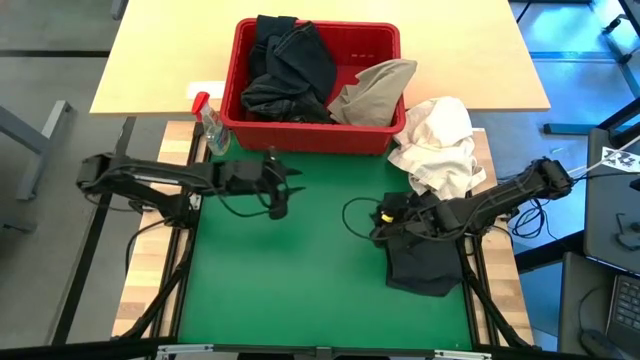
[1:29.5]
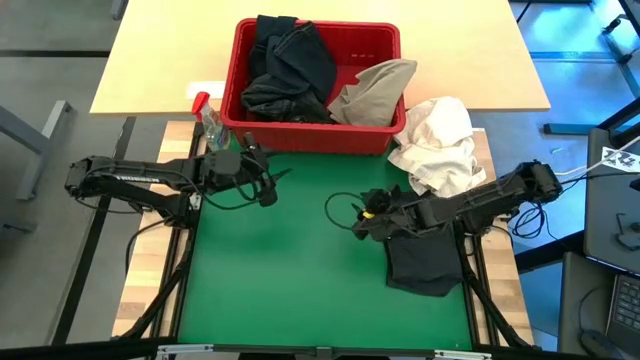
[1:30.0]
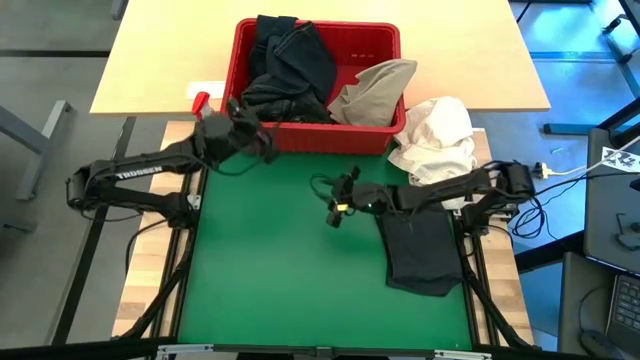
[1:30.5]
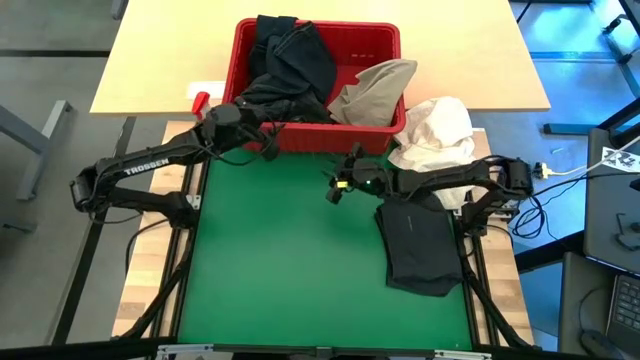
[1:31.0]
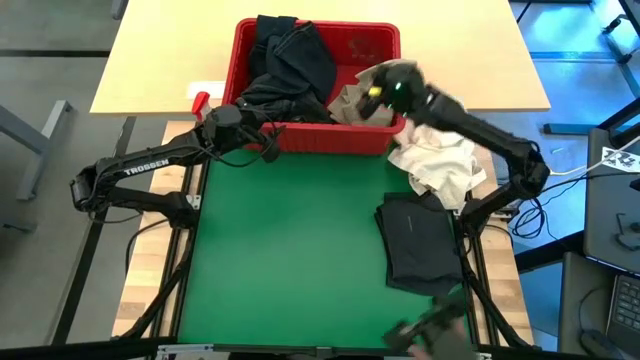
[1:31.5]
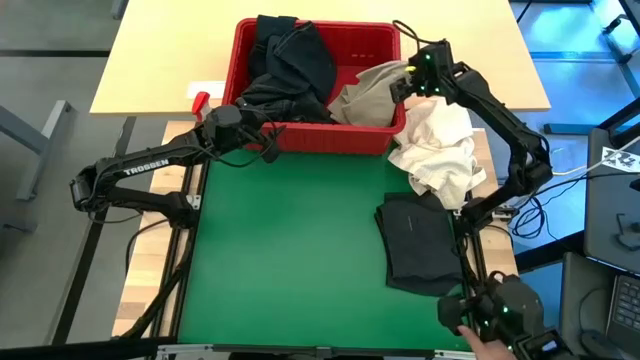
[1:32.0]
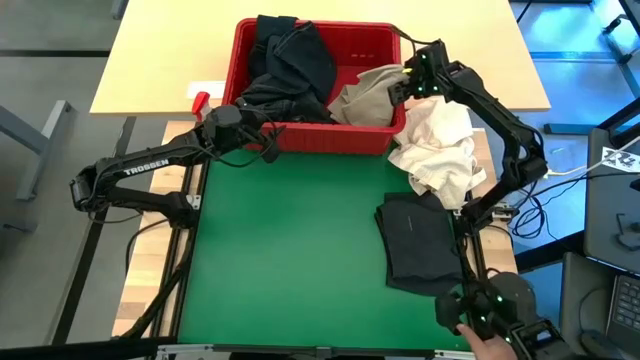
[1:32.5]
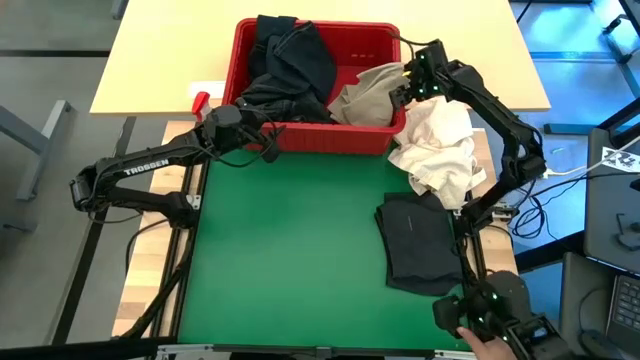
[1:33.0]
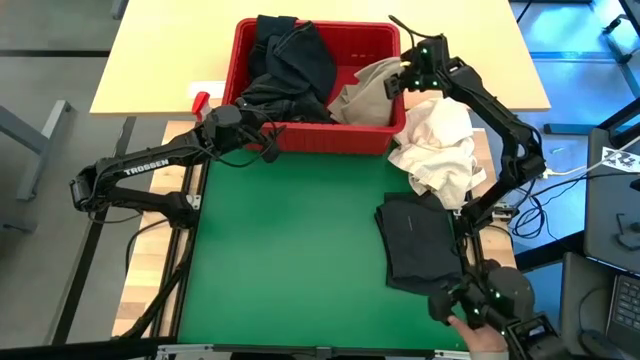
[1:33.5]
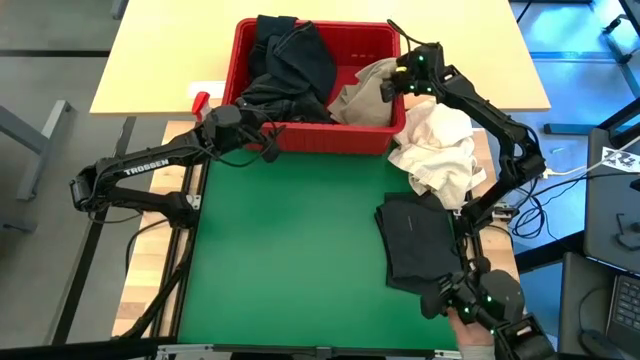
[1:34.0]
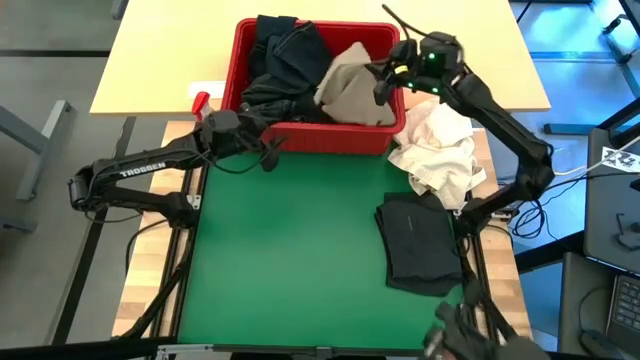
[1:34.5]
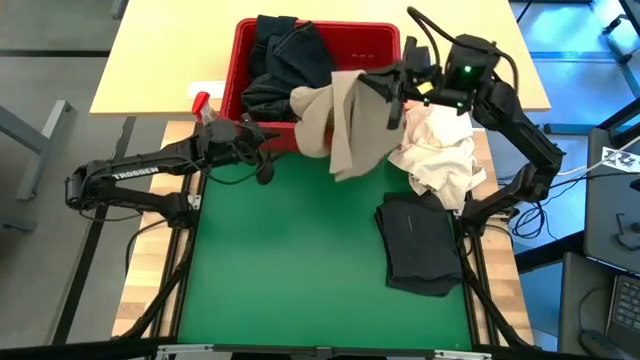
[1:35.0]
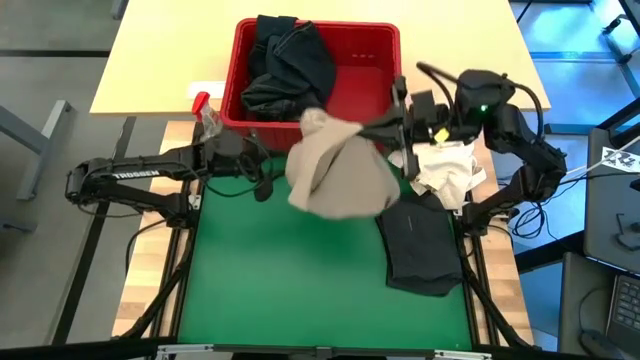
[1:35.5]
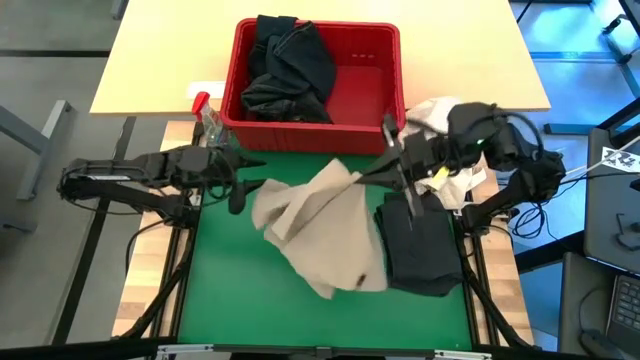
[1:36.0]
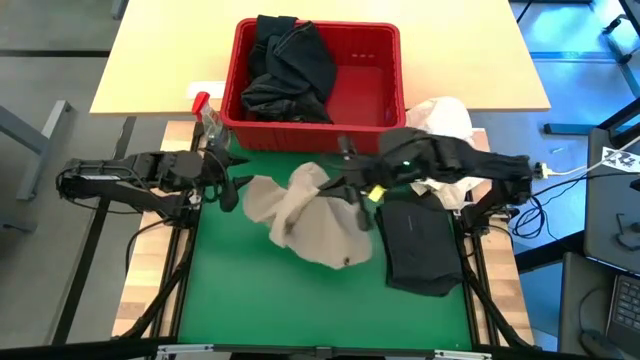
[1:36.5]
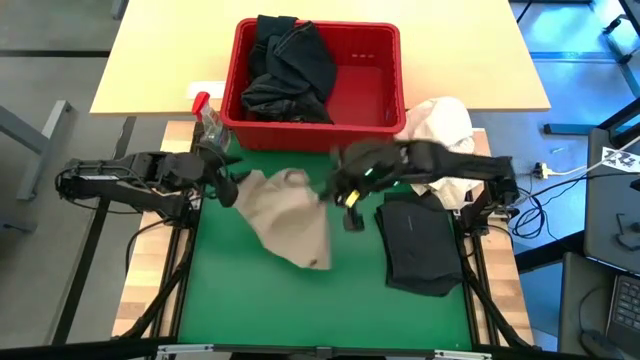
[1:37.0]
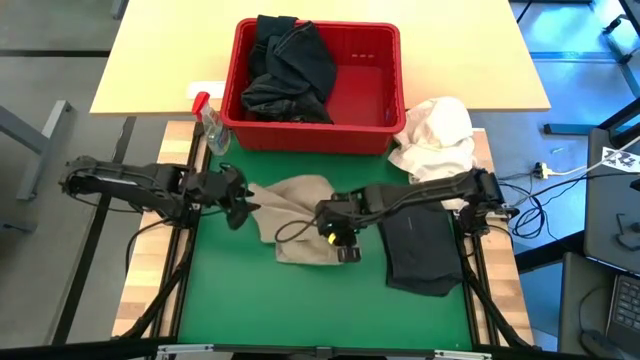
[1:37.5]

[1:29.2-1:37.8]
Task: Fold Laundry from Bin
Remove the brown shorts from the red laundry bin

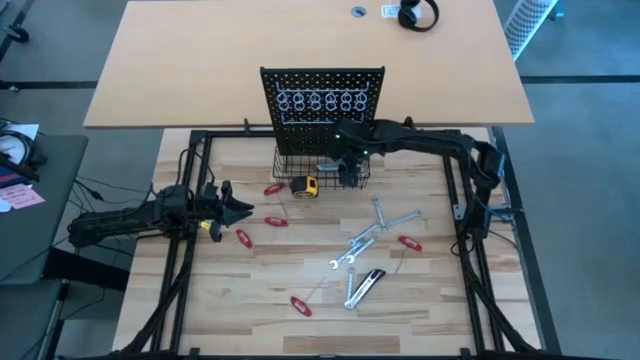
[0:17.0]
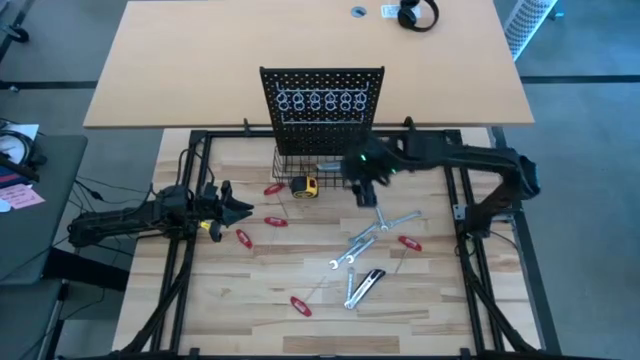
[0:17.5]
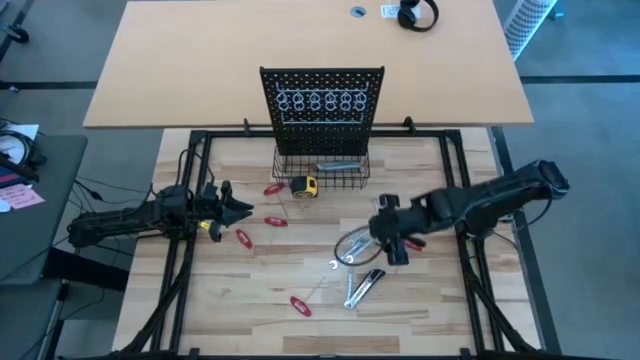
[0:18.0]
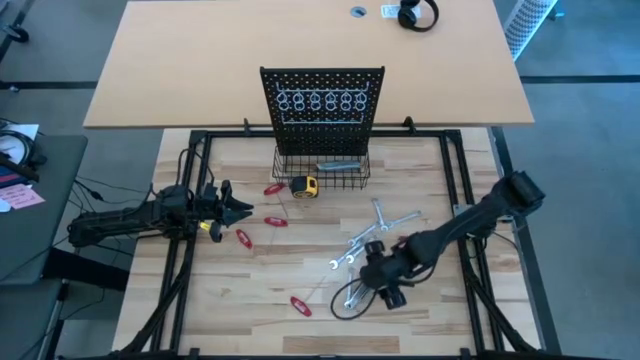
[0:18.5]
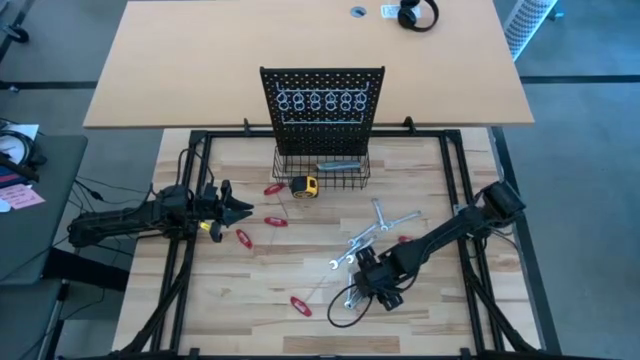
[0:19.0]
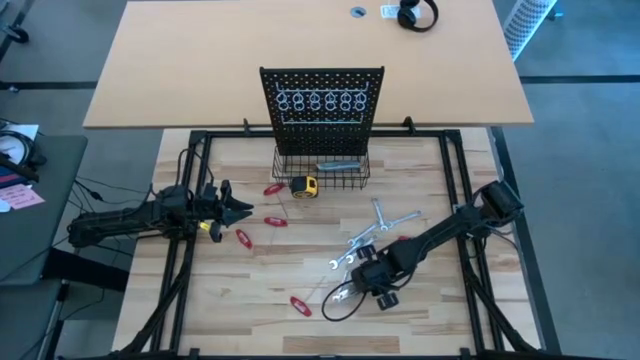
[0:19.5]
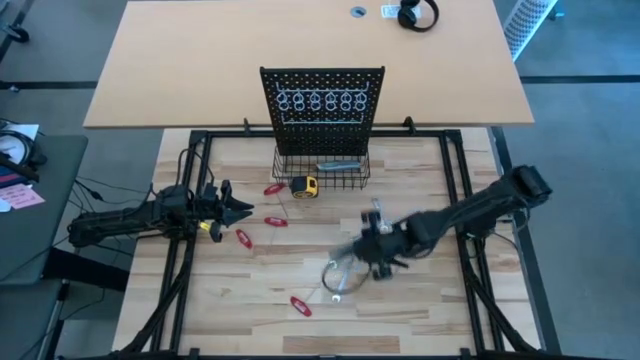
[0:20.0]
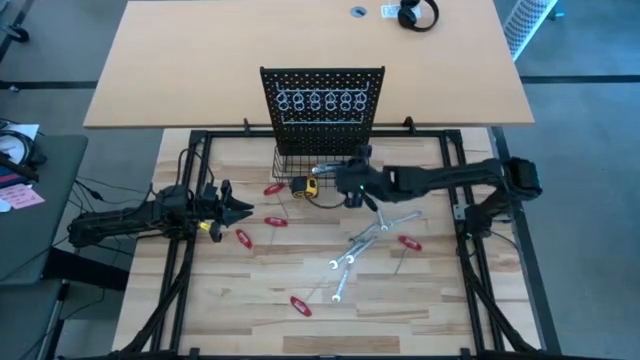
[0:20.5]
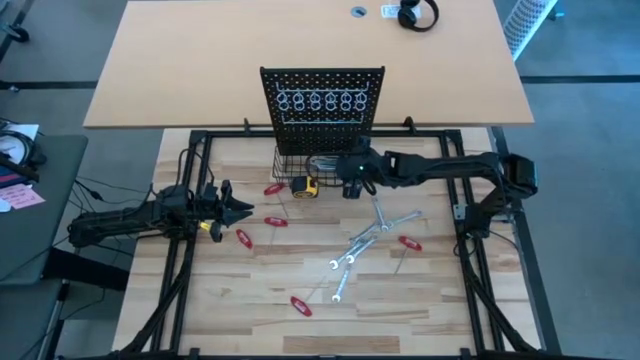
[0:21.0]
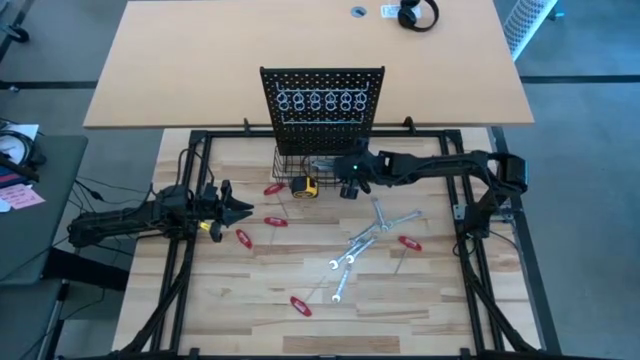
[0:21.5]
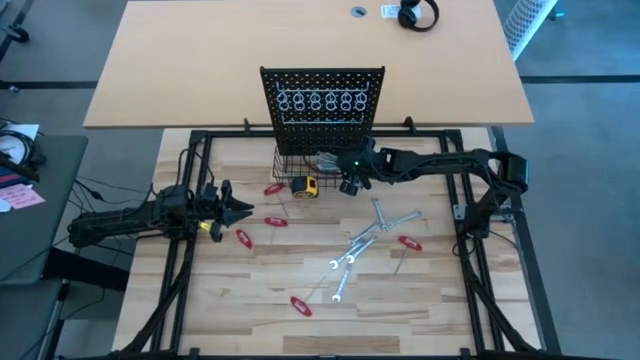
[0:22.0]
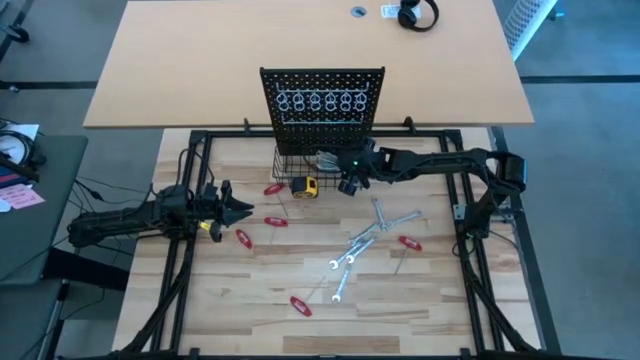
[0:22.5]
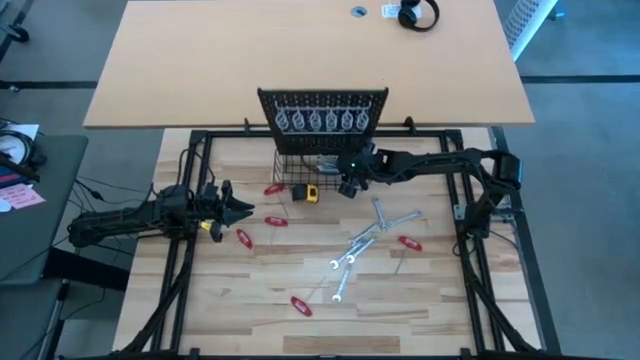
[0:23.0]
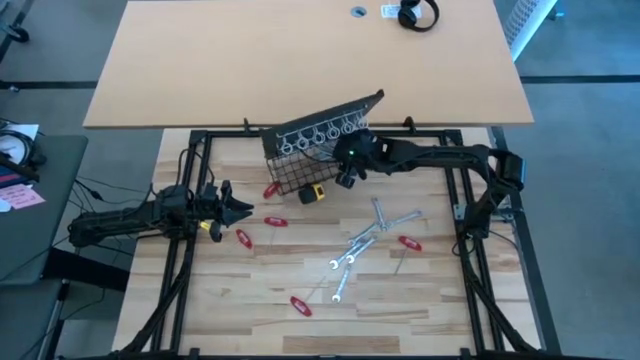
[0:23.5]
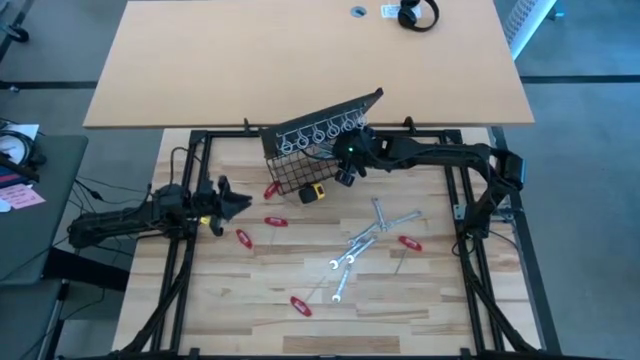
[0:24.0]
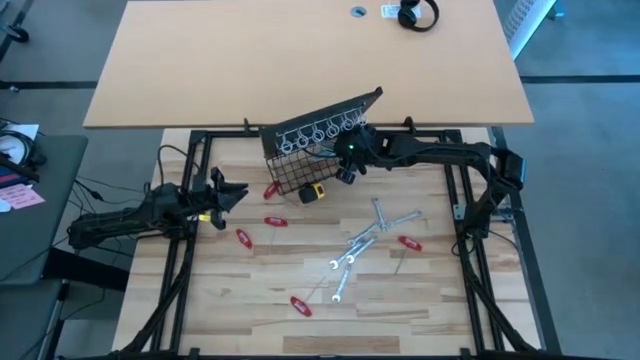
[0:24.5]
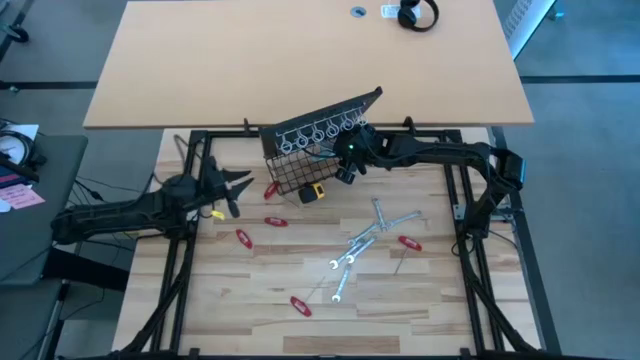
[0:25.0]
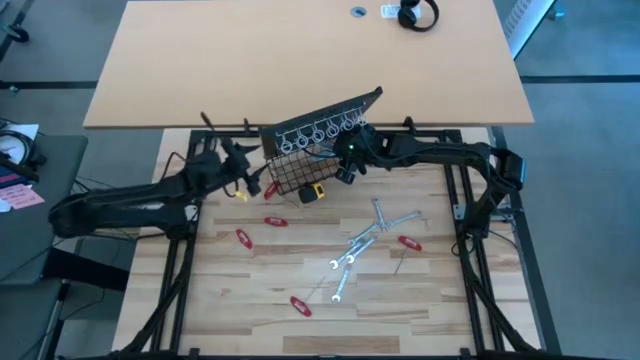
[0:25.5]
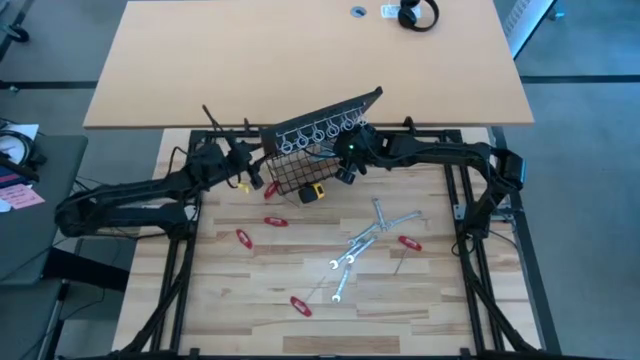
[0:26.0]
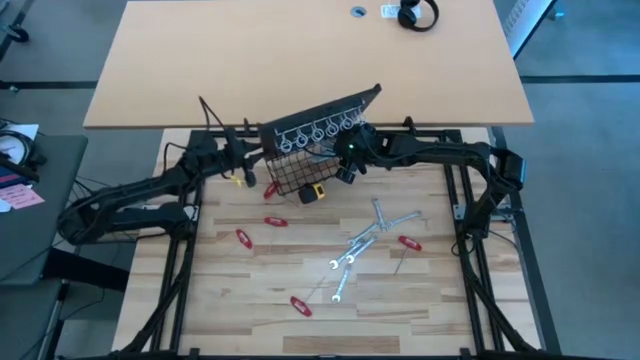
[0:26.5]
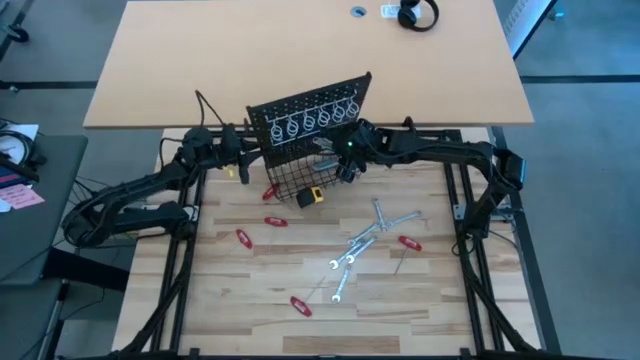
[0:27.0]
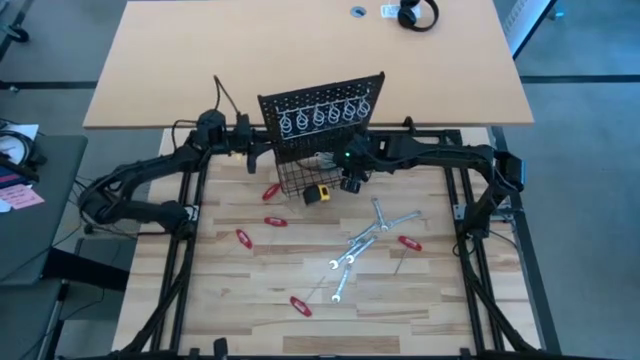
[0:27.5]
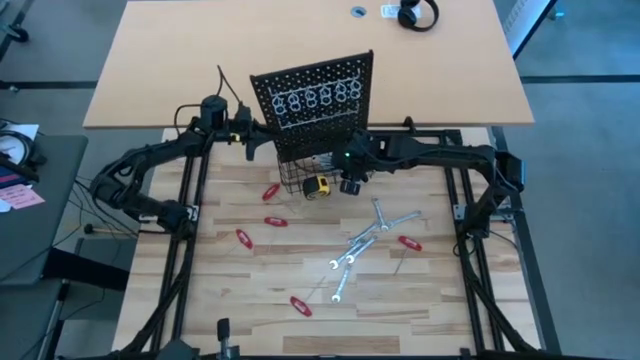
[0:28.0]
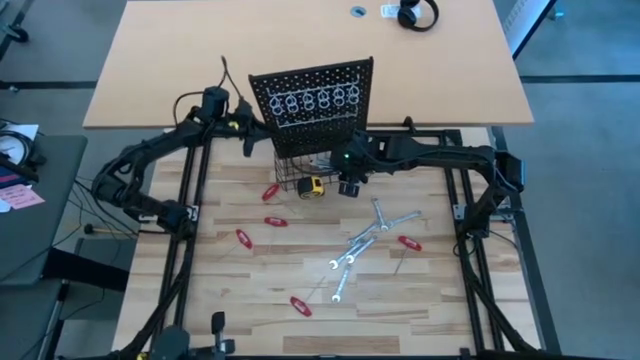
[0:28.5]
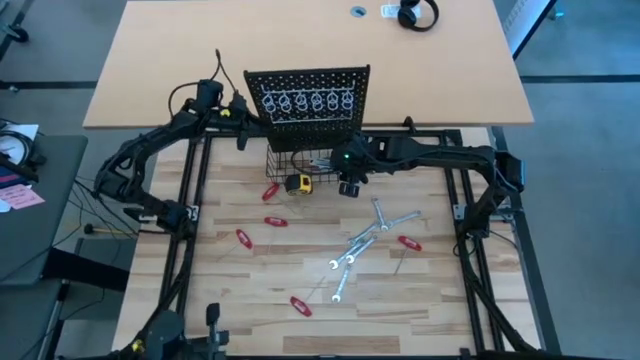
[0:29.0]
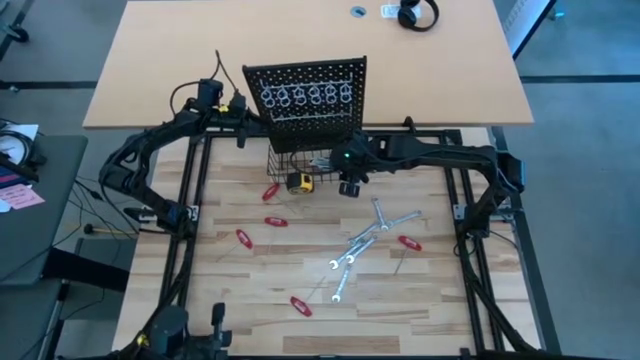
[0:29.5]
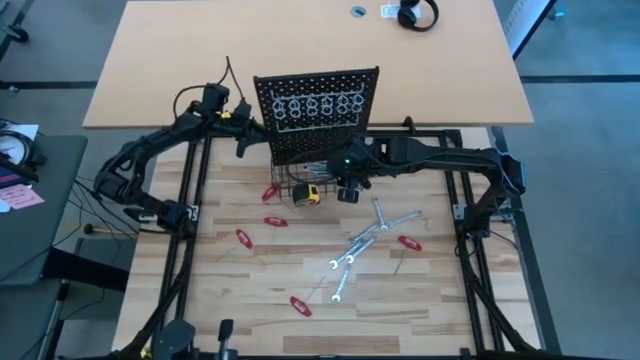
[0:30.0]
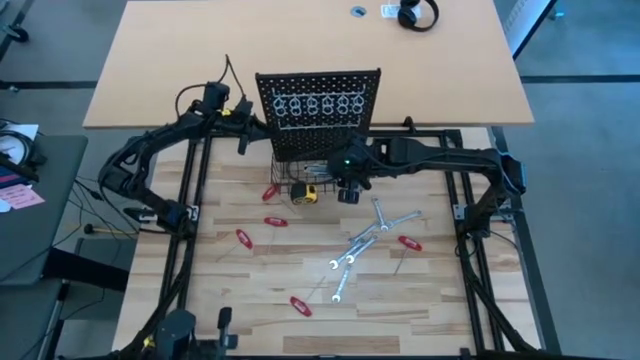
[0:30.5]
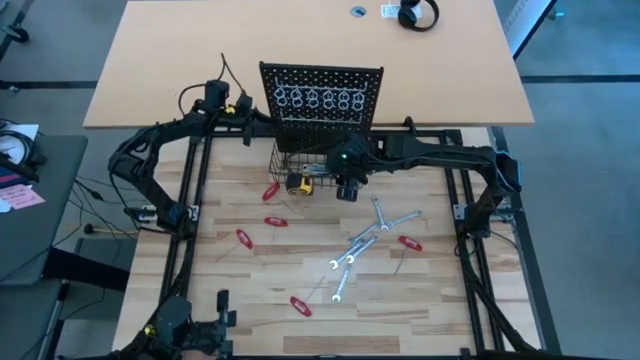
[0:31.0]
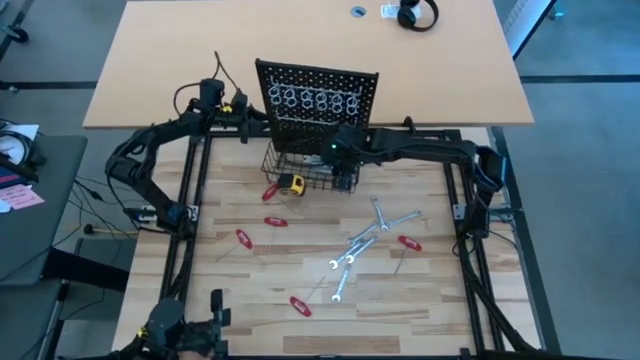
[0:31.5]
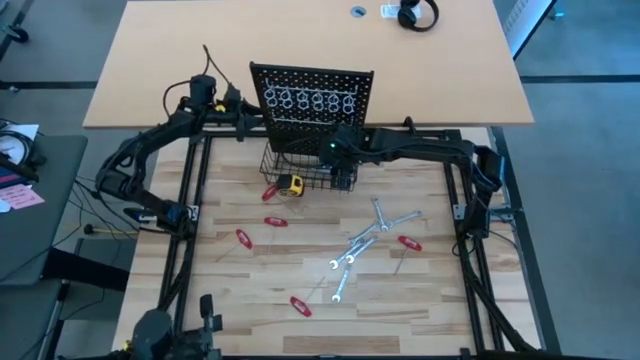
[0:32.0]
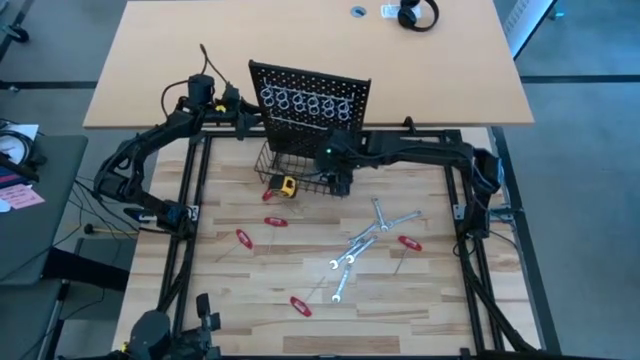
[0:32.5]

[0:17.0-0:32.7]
Task: Hang tools onto peg board
Put the cutter into the pegboard
